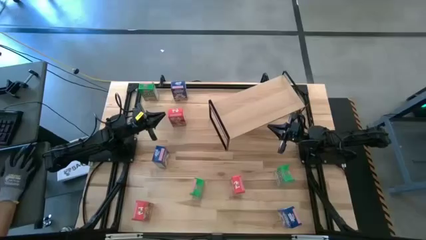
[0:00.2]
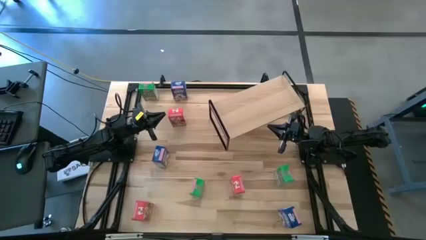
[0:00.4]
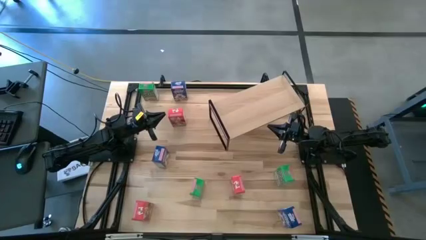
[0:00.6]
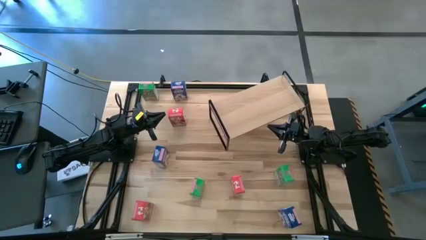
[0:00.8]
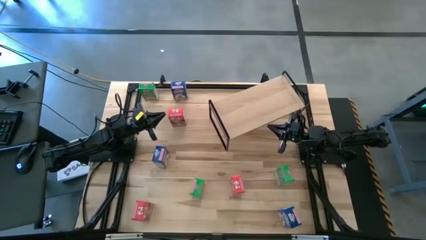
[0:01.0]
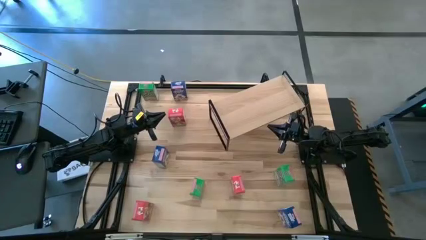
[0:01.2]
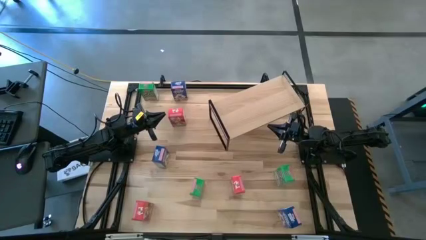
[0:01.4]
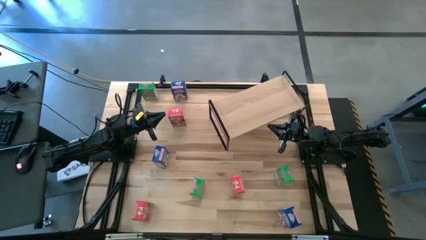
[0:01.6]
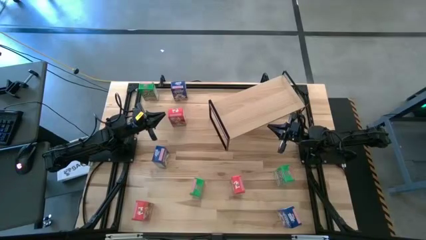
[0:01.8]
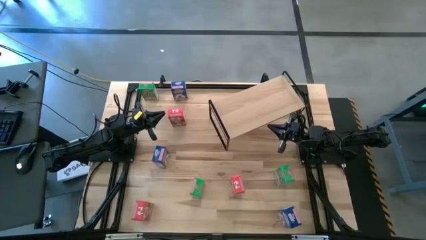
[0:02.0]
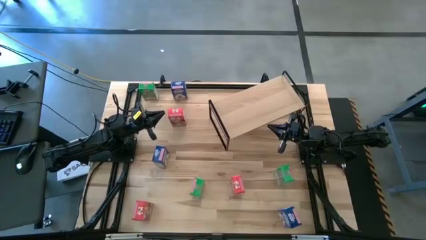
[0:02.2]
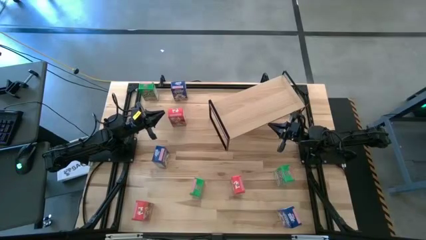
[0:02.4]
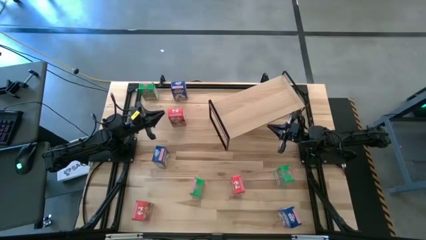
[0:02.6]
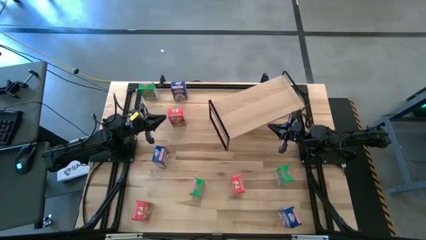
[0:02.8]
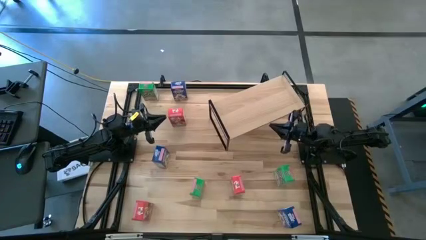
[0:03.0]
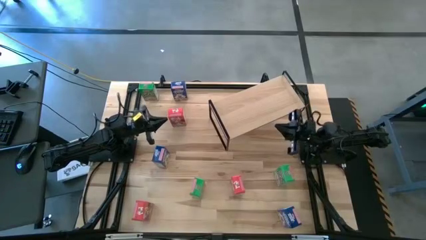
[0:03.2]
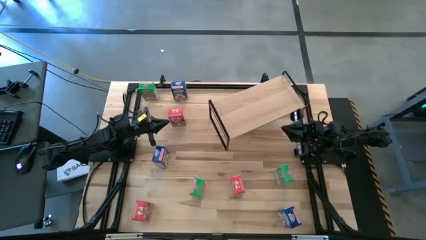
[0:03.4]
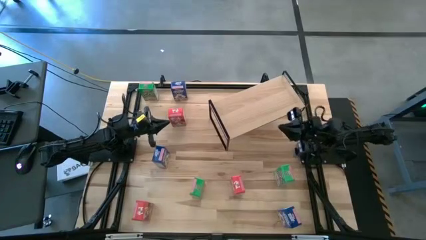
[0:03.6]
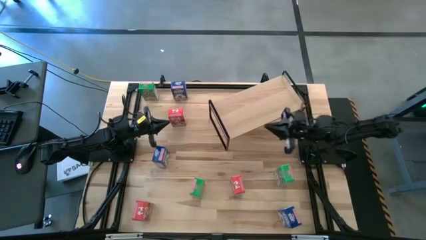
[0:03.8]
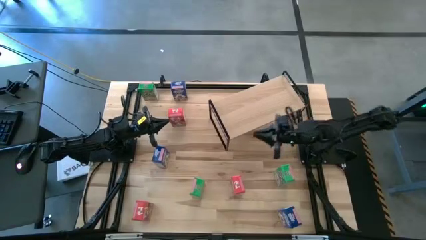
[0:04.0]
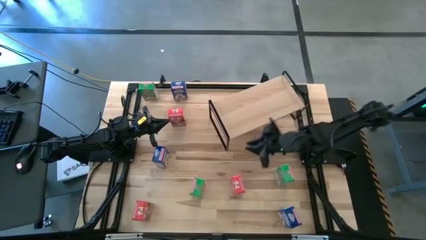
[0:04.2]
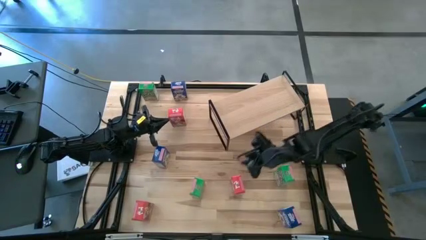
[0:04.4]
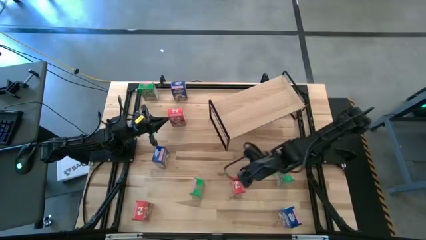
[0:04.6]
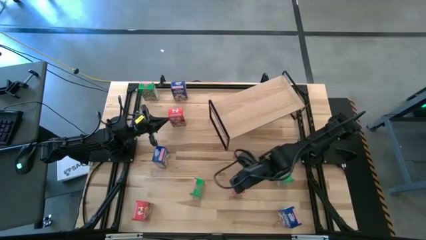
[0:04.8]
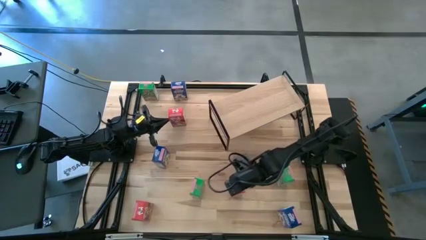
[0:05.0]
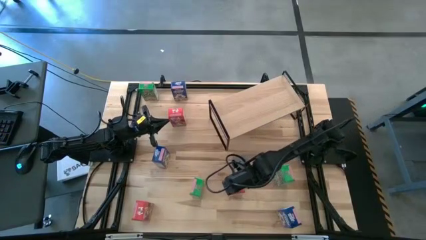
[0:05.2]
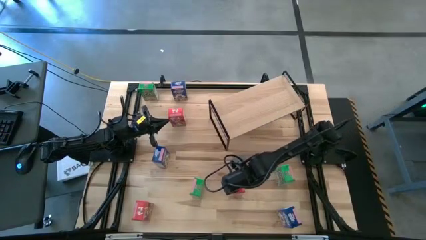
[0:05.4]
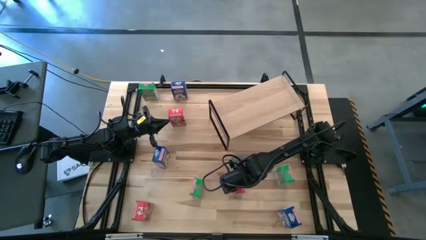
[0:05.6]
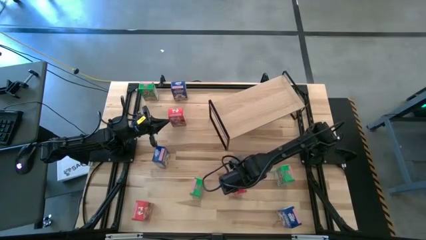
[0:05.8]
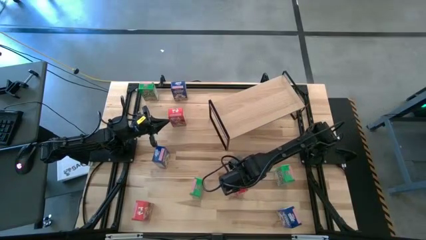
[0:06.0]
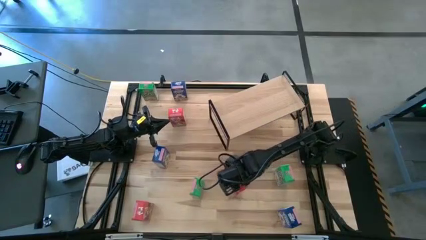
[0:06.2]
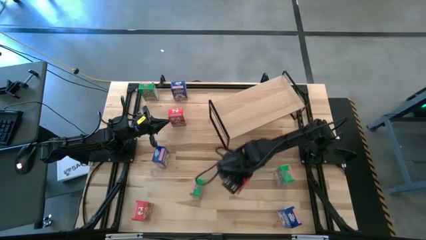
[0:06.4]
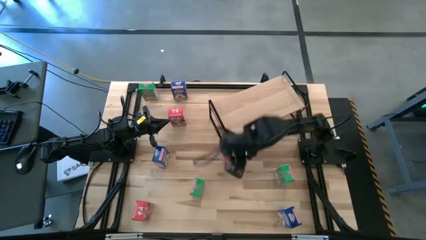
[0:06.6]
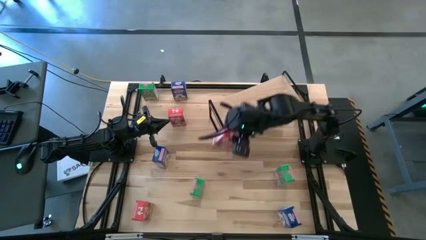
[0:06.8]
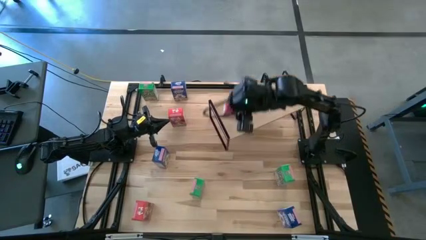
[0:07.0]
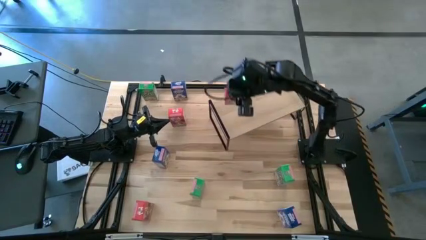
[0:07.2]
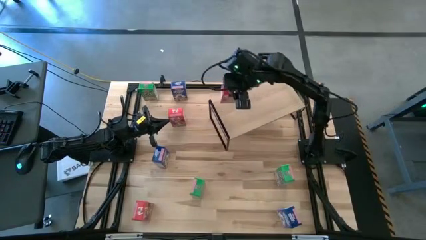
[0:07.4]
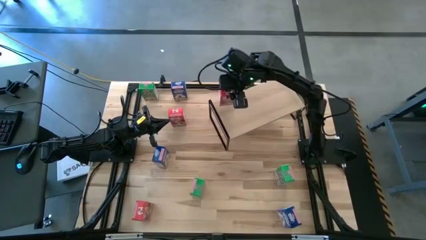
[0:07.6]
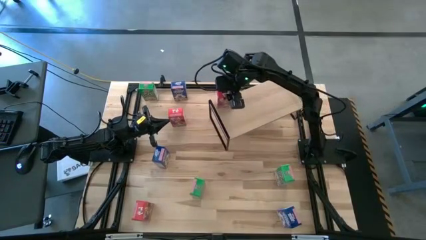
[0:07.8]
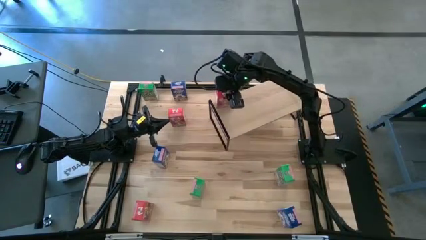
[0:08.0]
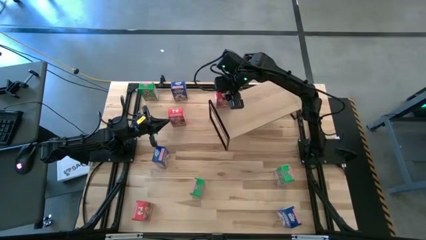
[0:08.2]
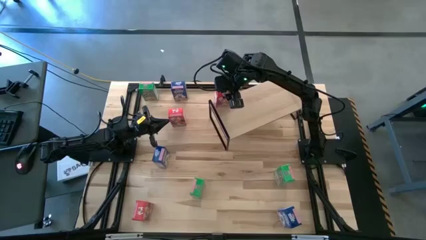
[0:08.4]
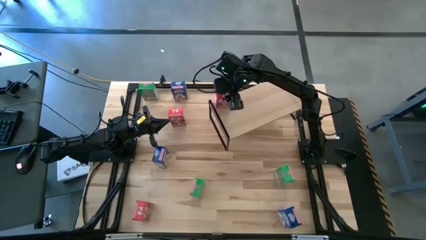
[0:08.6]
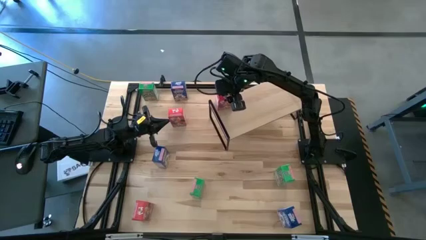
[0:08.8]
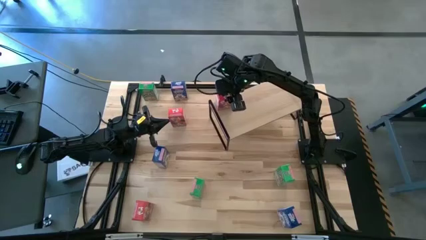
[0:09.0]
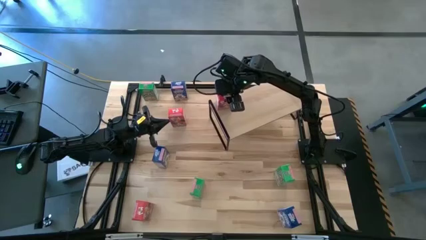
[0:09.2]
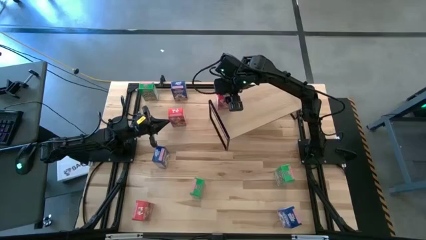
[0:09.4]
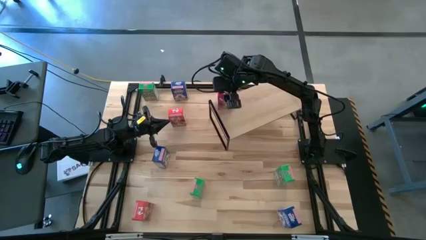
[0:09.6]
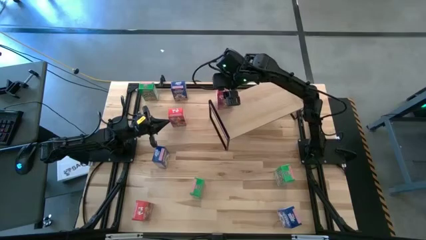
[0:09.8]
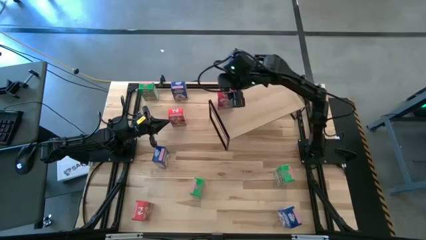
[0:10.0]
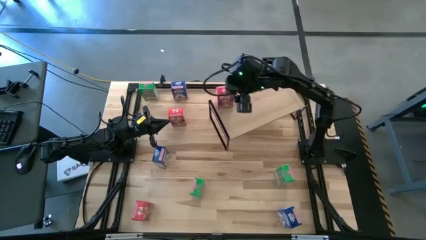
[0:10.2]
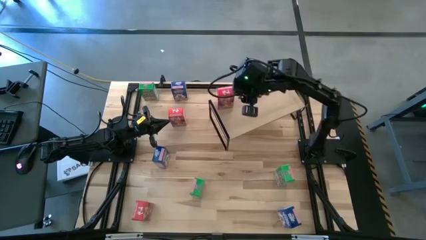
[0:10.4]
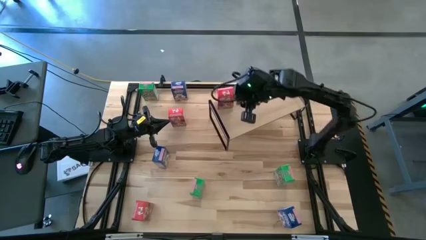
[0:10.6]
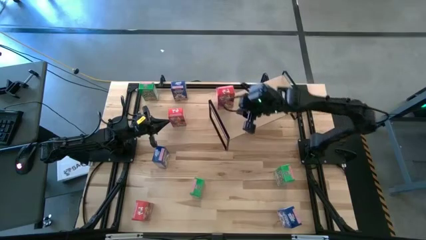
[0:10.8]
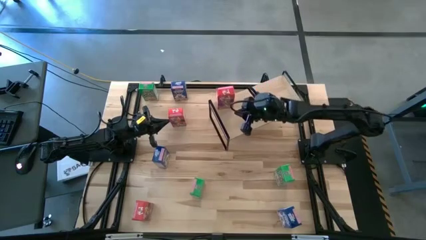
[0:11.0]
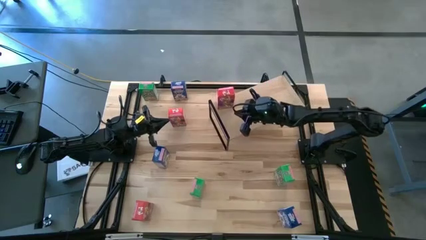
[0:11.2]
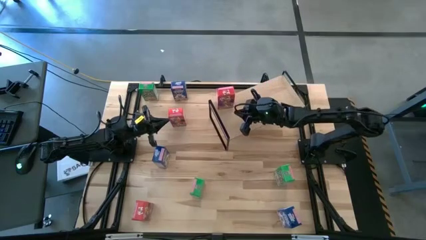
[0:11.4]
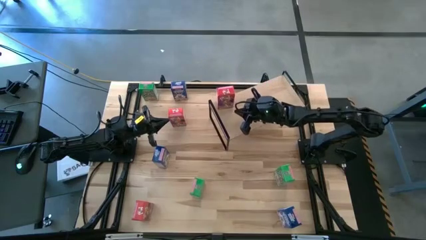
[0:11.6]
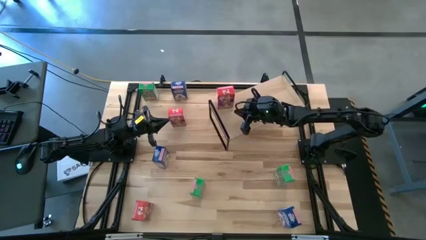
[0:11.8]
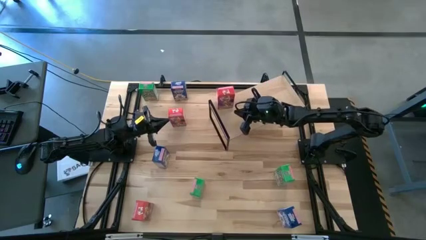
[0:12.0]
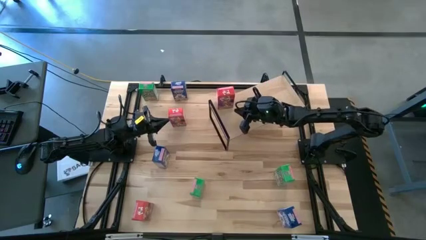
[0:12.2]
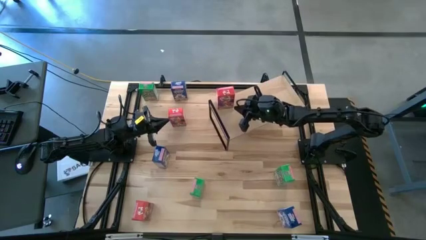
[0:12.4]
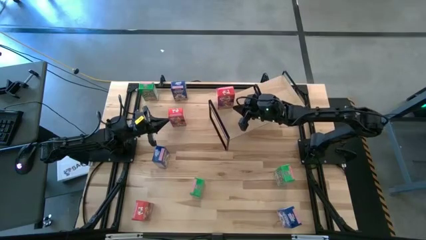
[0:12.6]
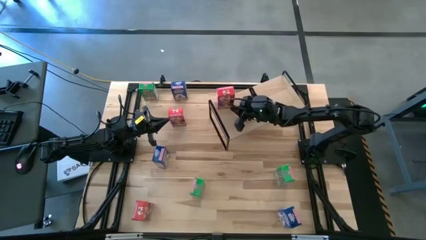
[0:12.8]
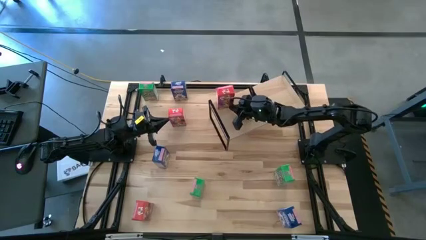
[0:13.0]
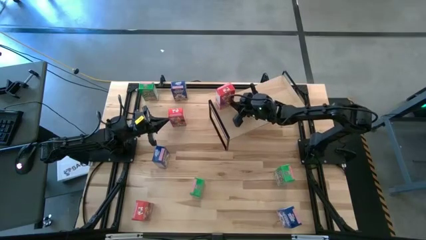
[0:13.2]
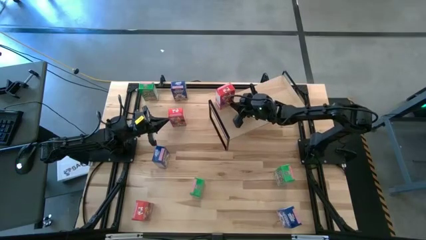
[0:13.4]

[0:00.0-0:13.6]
Task: Stack cereal on shelf
Put the right red cereal box on the shelf
